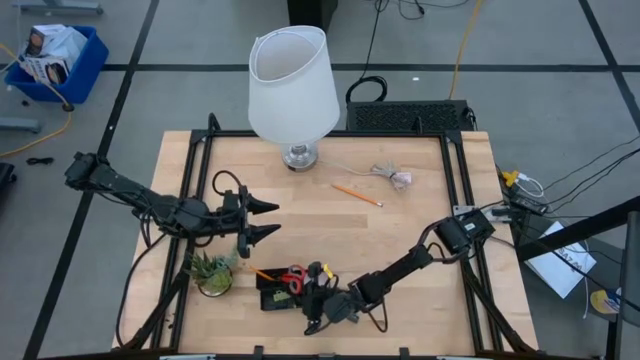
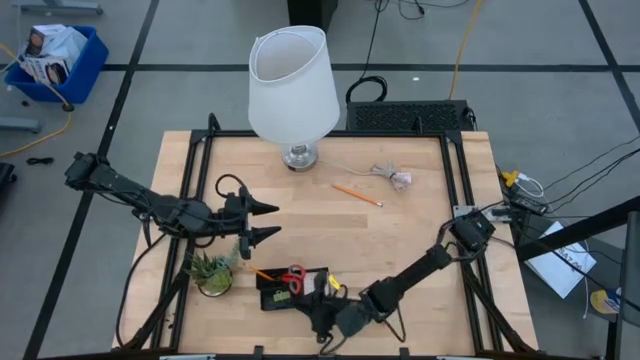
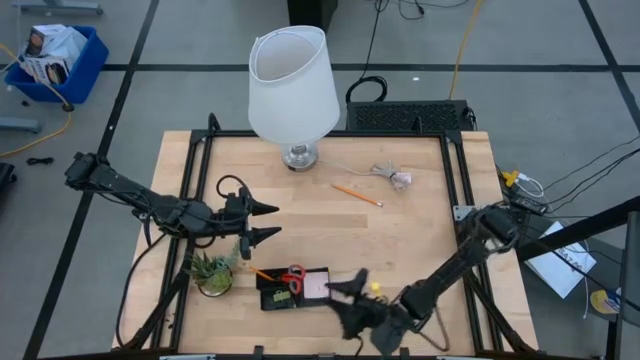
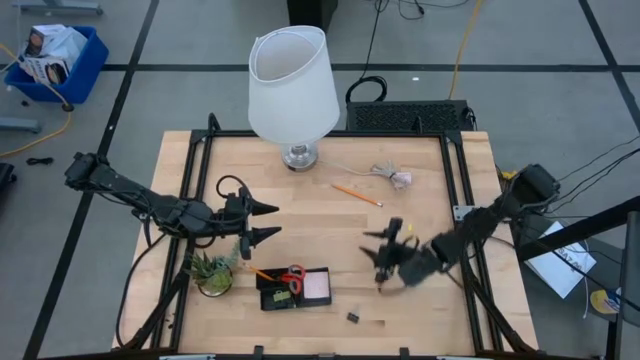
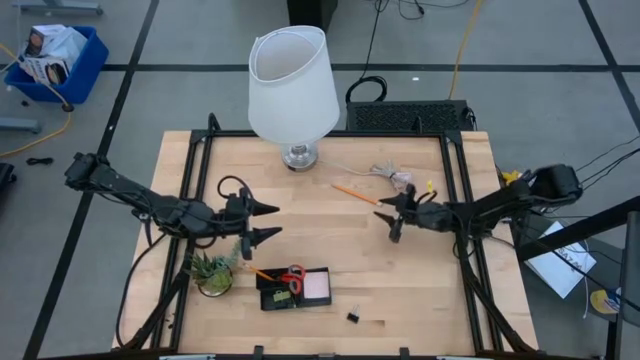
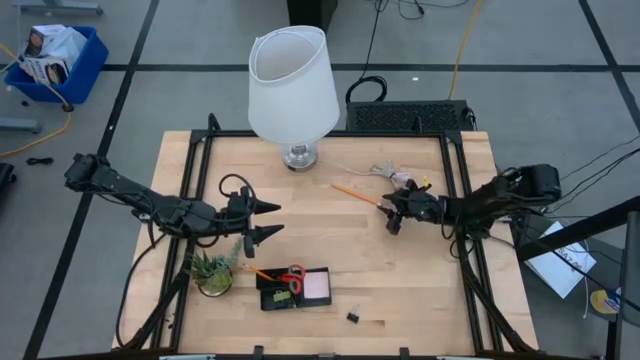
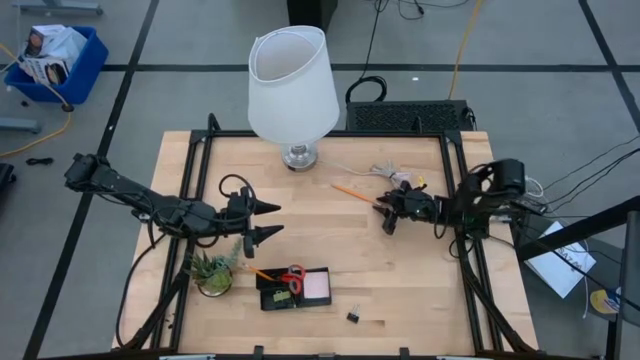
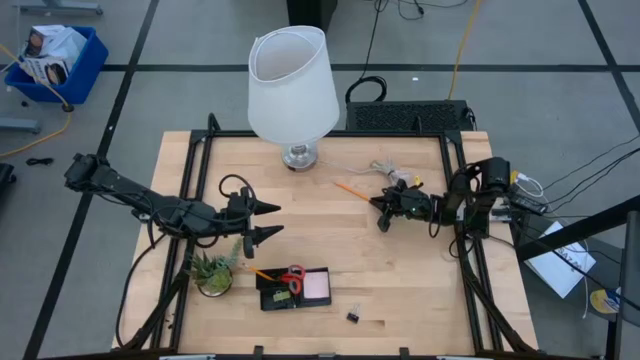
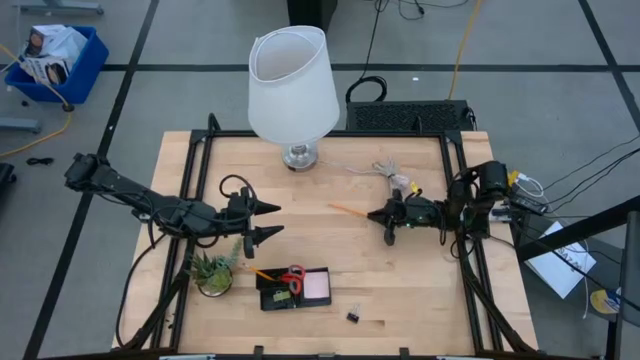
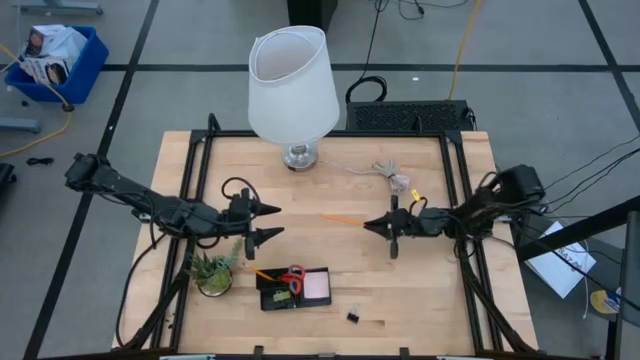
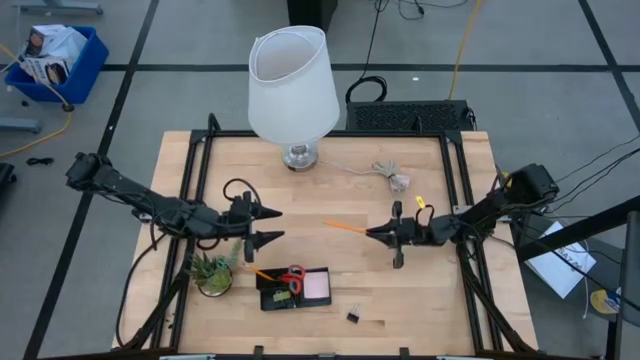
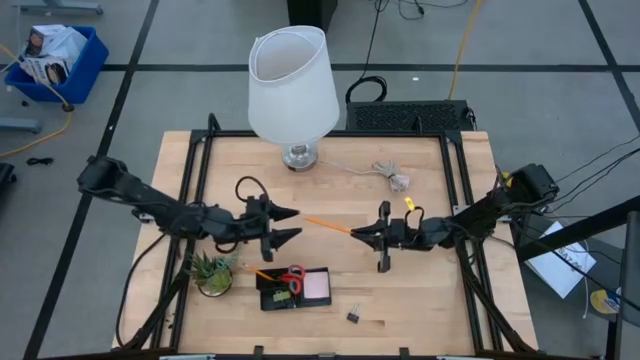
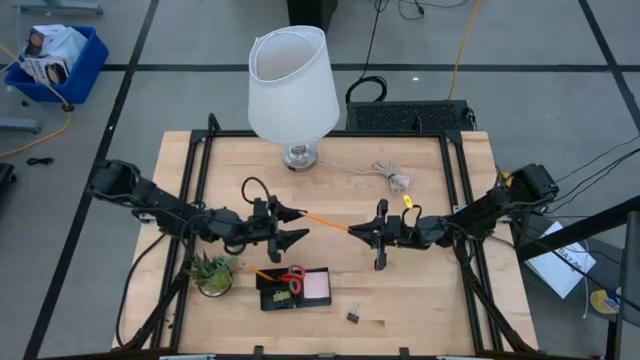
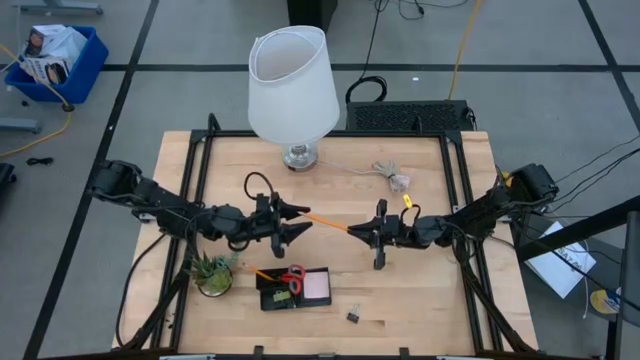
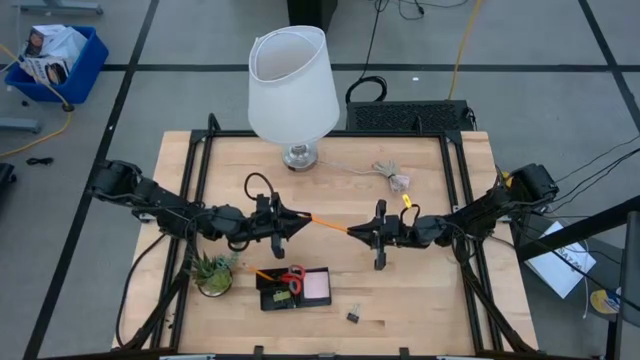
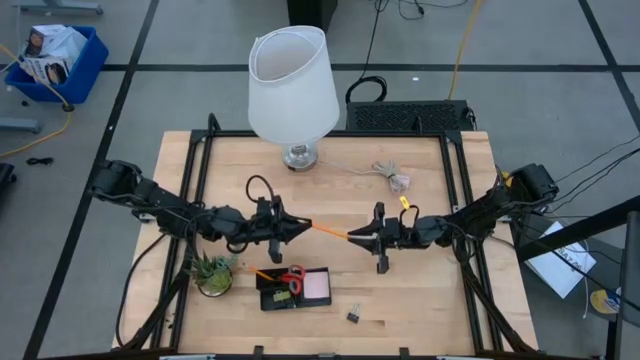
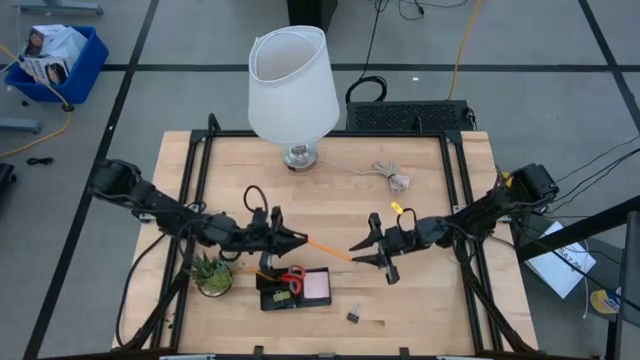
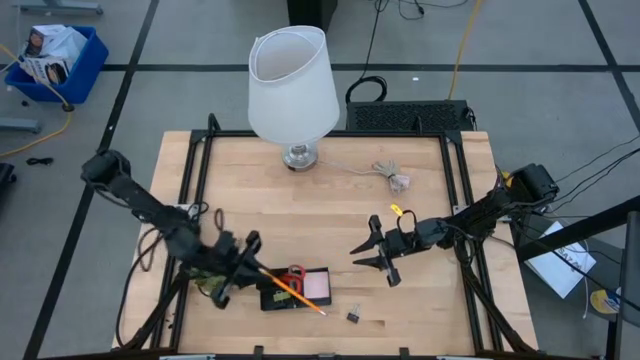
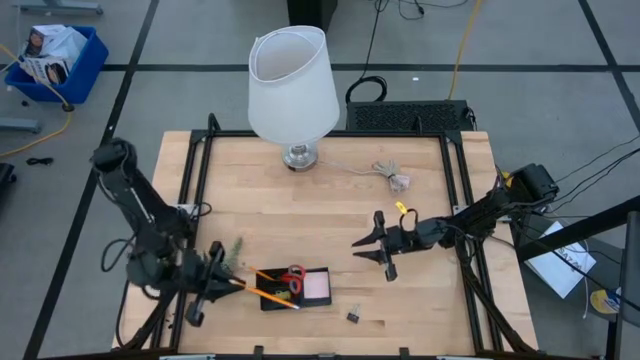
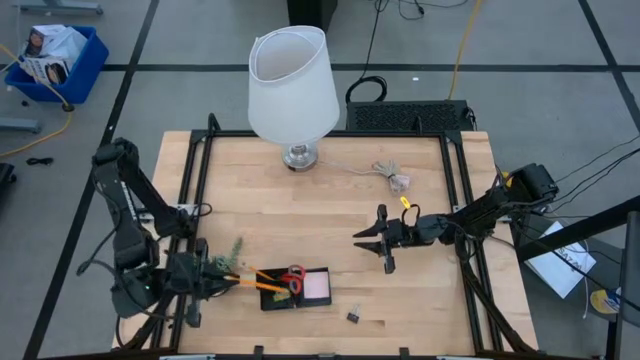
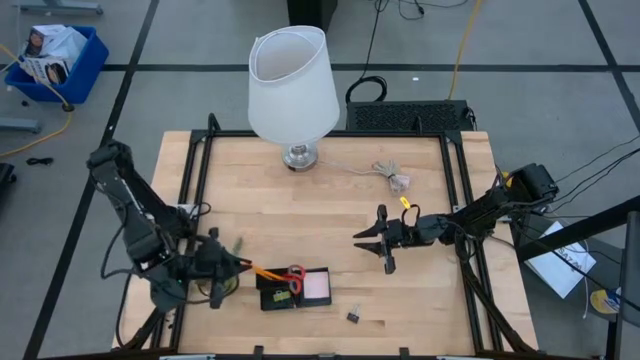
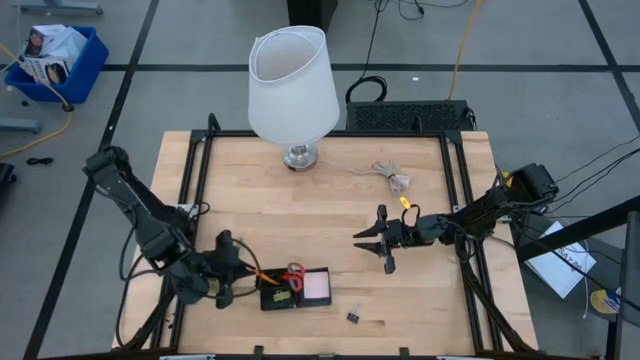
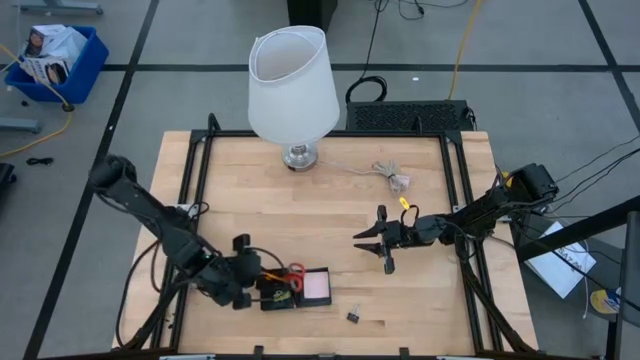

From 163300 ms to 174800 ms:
Task: Pick and place office supplies into organizer
Put the yellow pencil into the black desk organizer

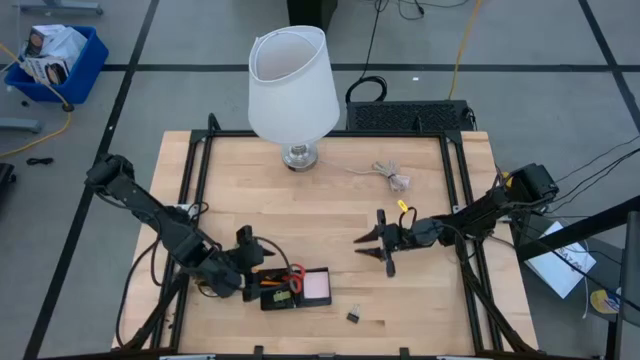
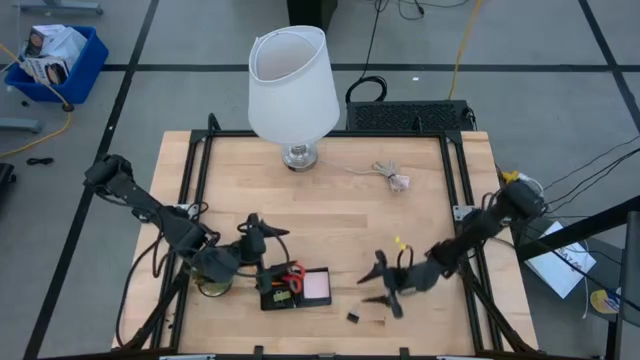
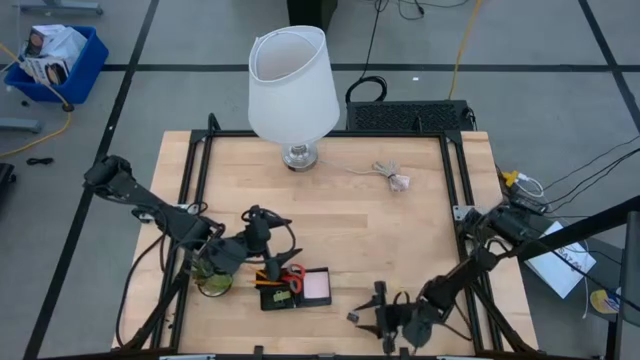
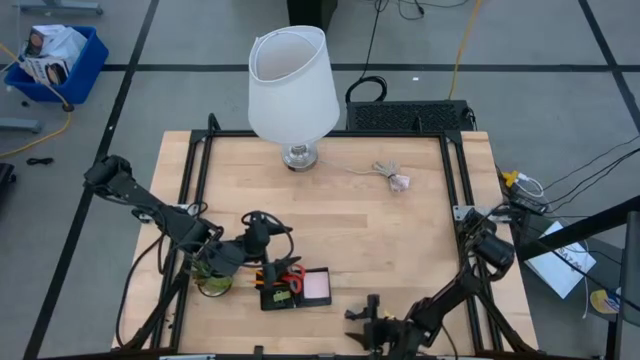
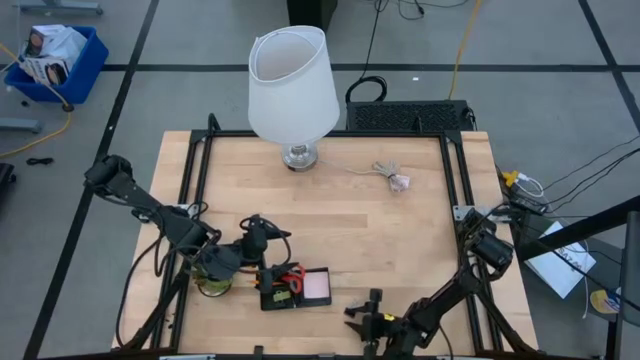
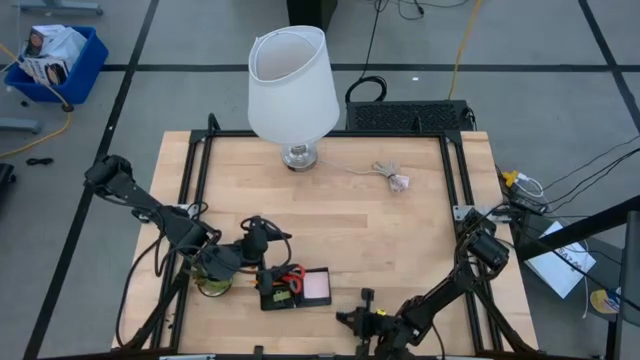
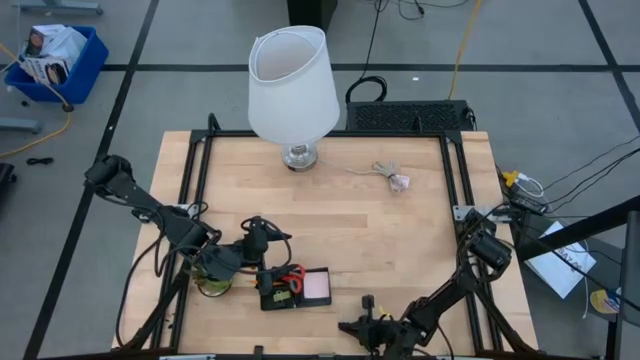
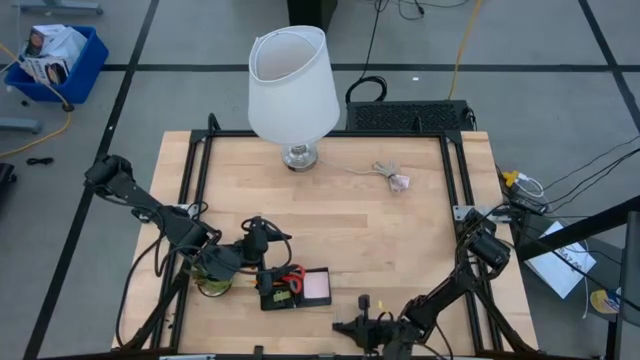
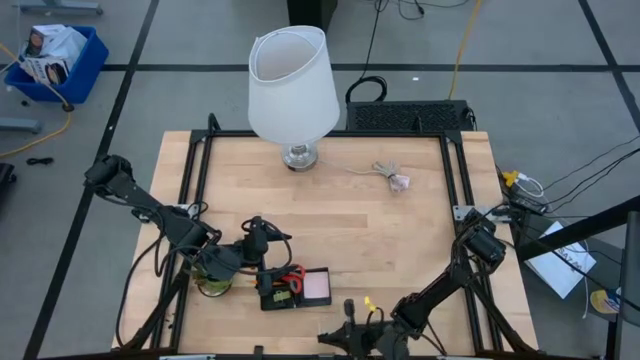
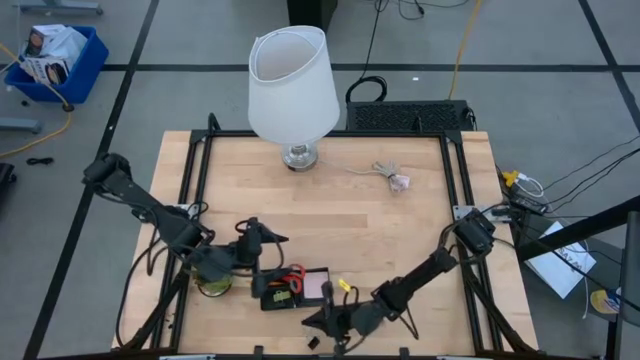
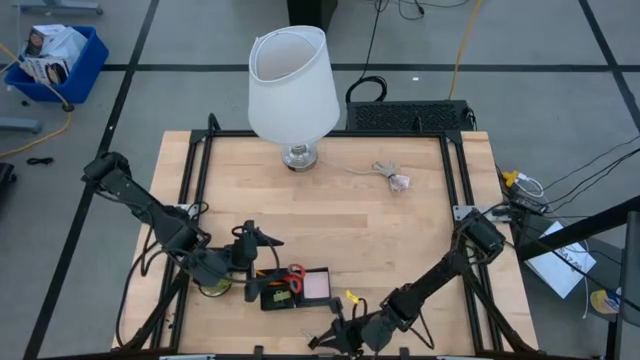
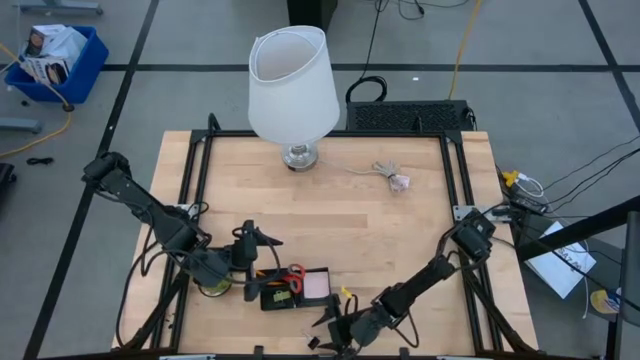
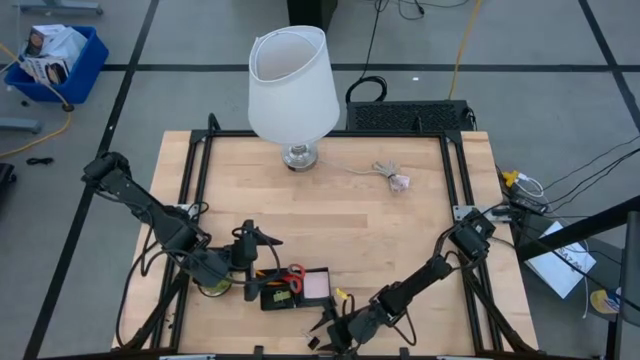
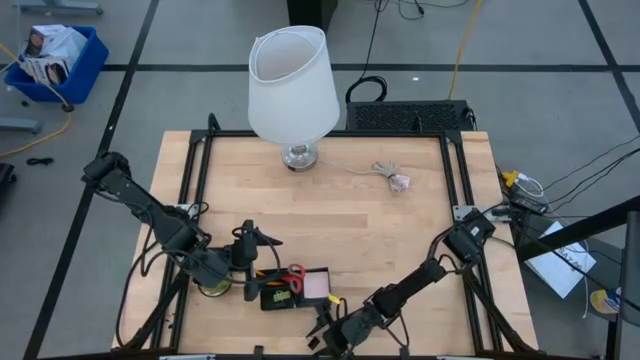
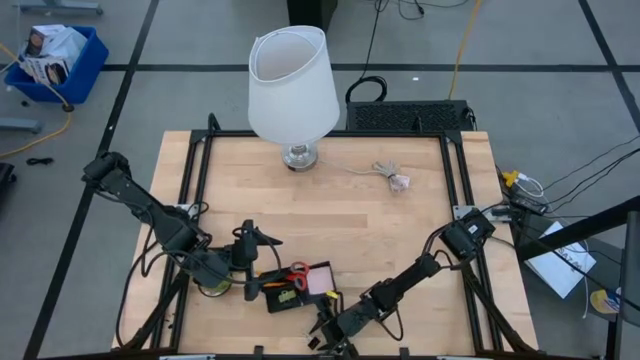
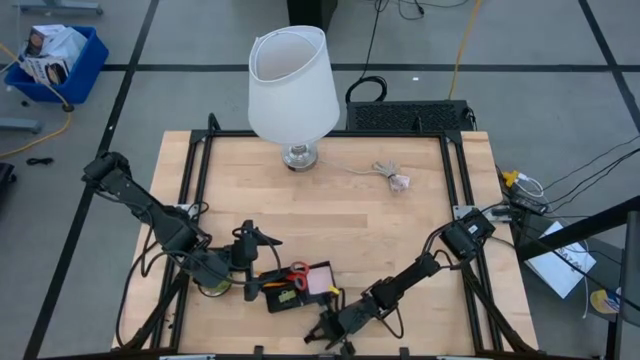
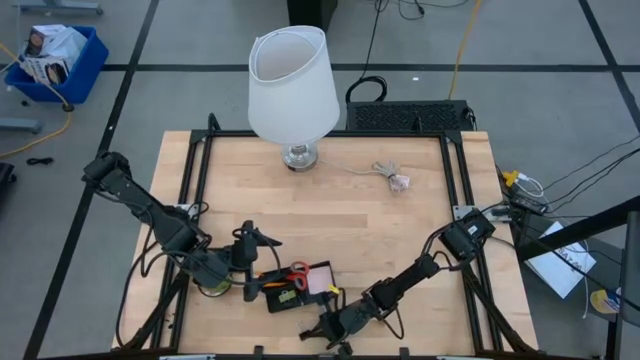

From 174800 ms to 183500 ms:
Put the black paper clip into the black desk organizer

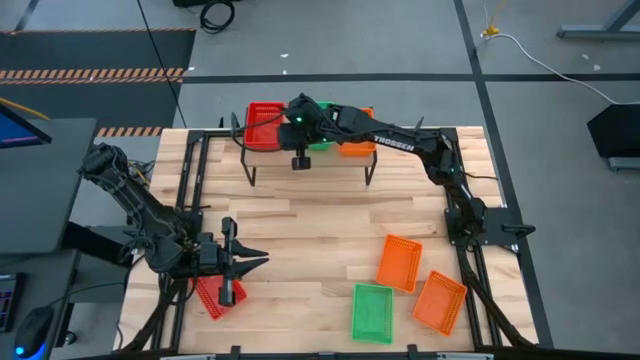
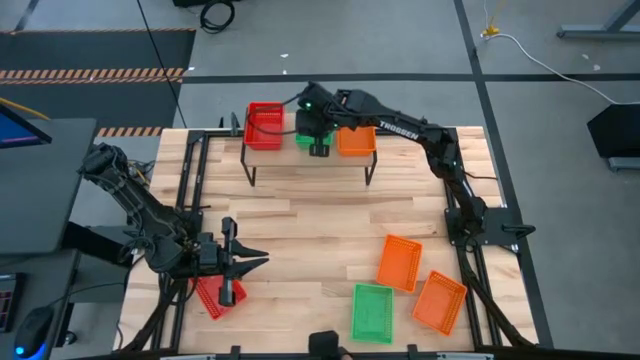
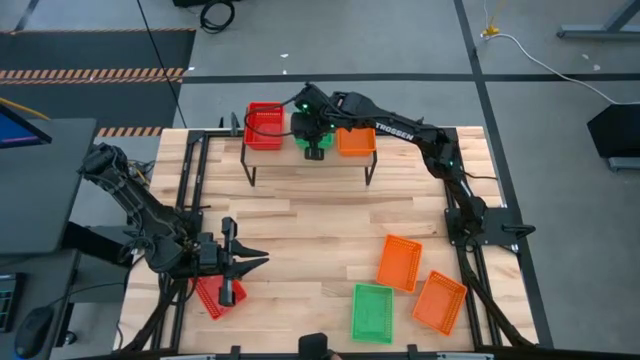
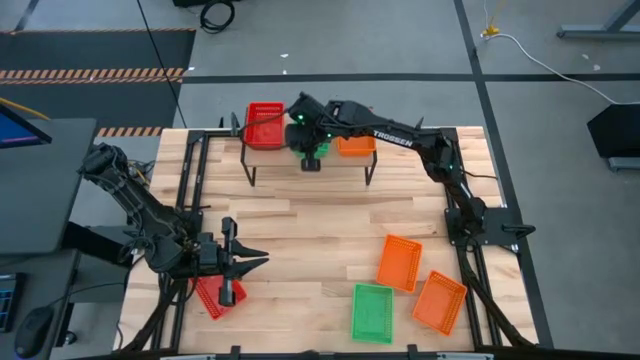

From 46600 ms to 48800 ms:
Task: Stack baskets on shelf by color
Adjust the stacked green baskets on the shelf
